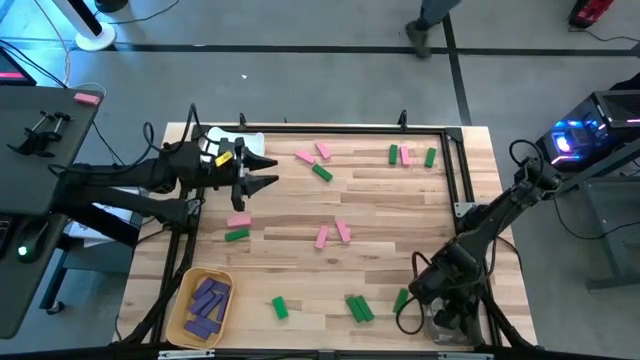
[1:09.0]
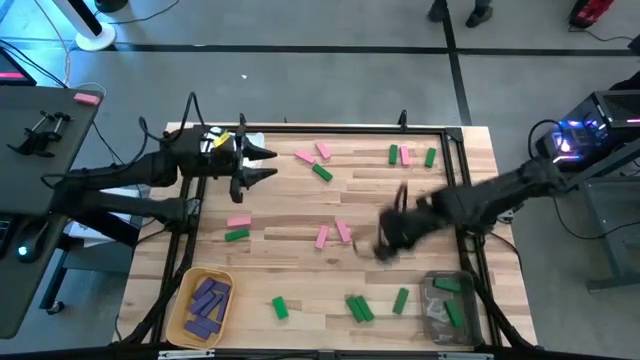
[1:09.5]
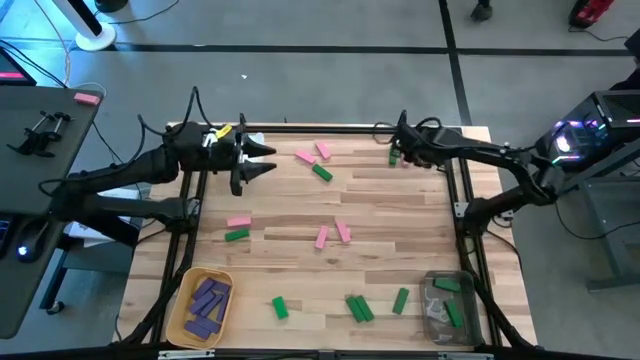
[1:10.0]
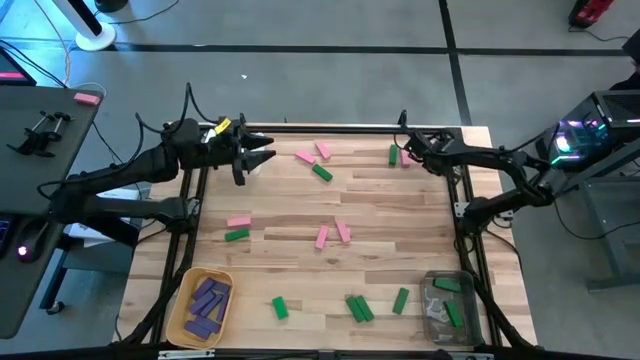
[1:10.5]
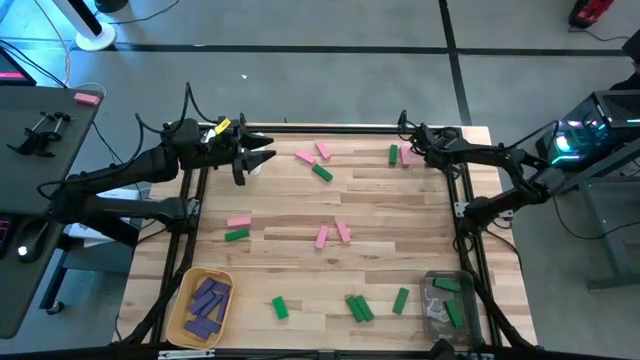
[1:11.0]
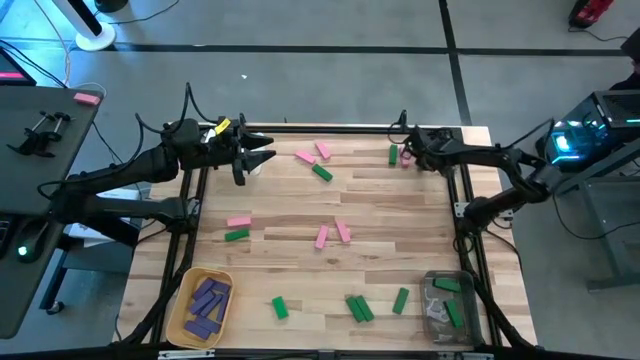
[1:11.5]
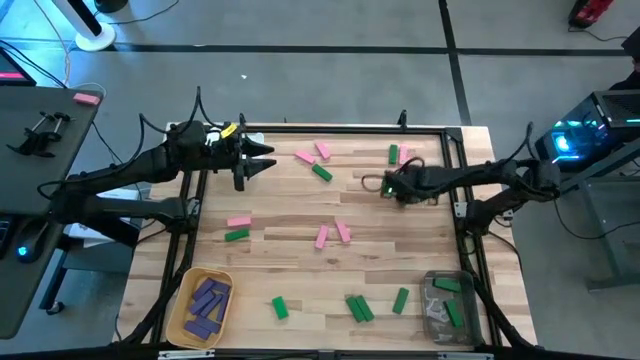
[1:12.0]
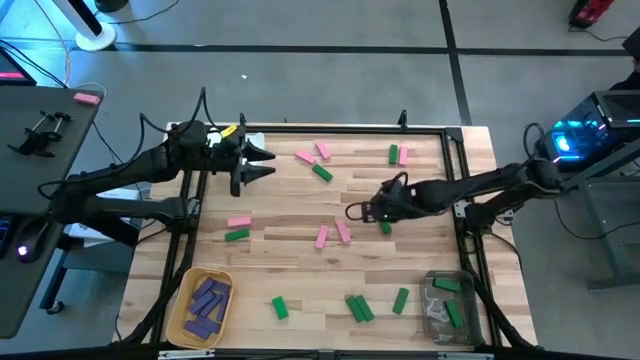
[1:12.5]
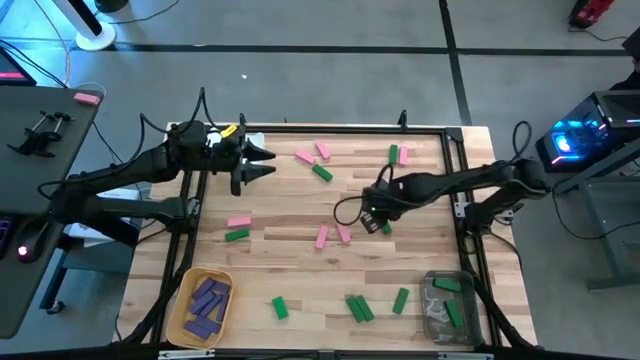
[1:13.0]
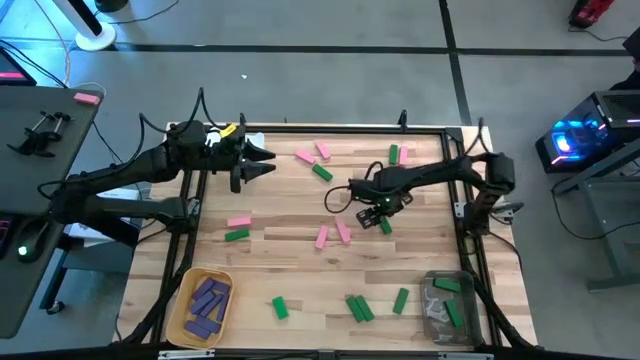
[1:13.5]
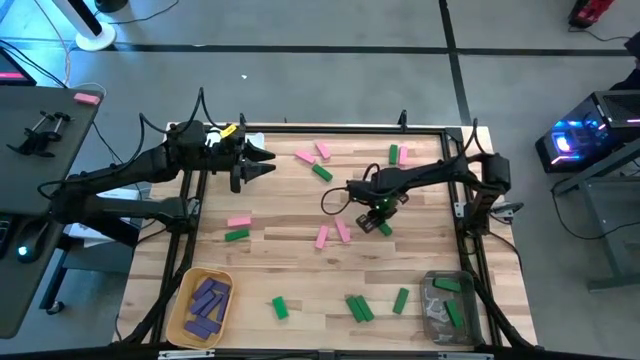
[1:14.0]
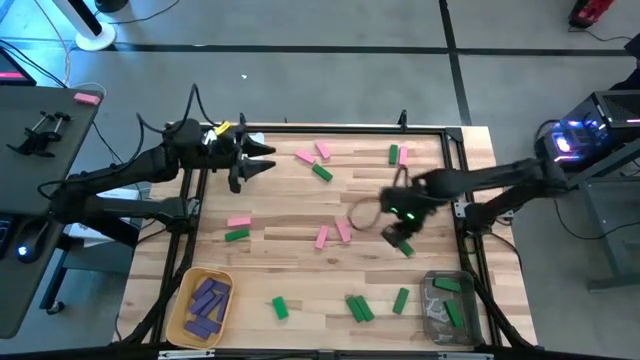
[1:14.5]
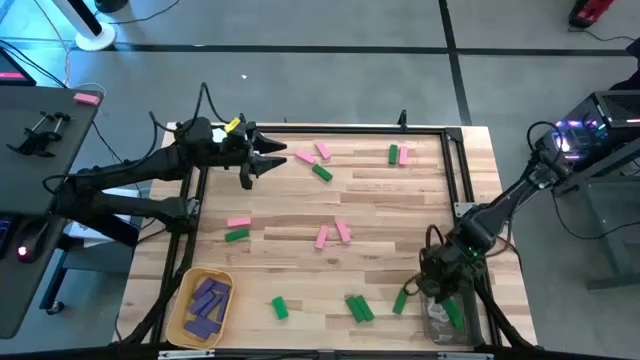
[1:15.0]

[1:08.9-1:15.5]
Task: Sort blocks
Put the green block into the black bin

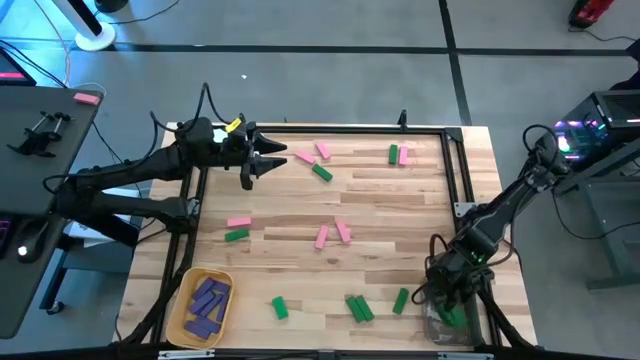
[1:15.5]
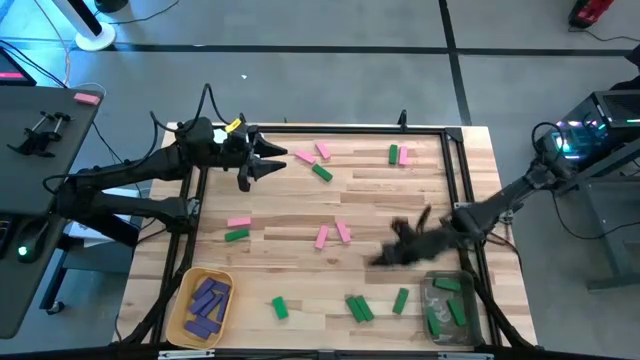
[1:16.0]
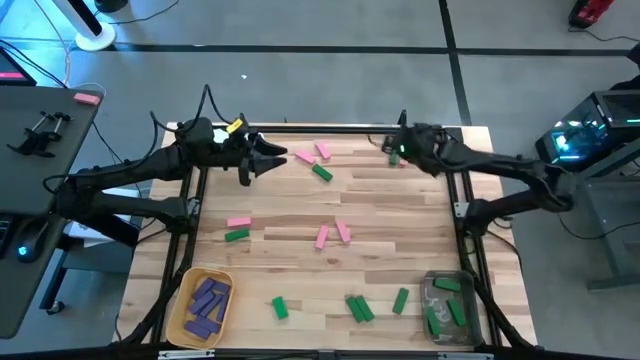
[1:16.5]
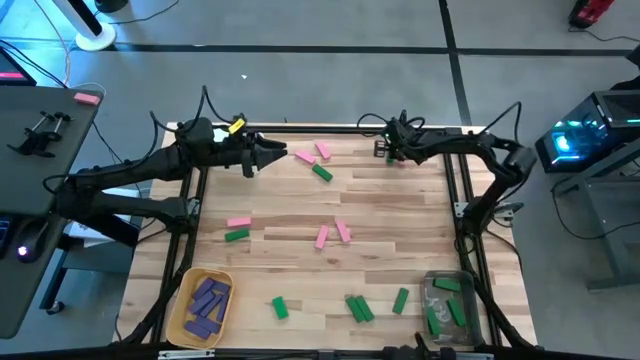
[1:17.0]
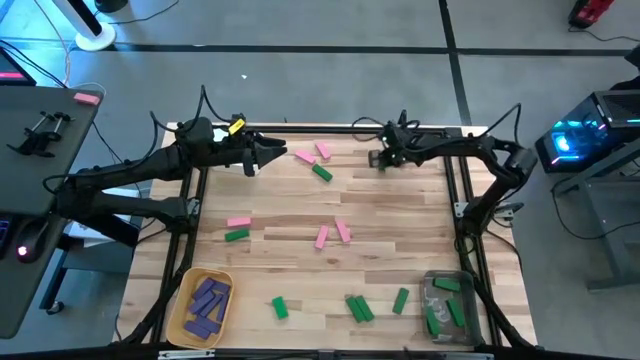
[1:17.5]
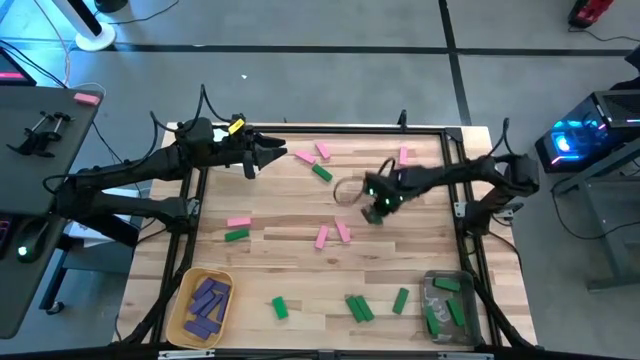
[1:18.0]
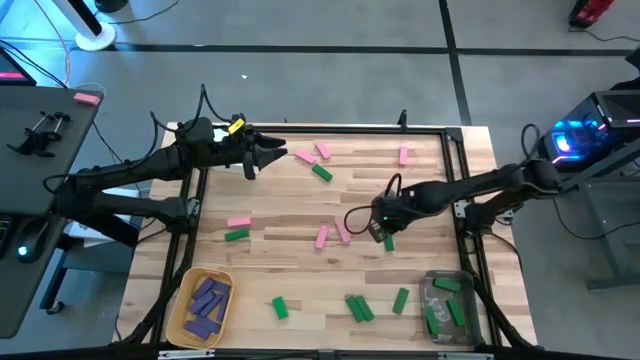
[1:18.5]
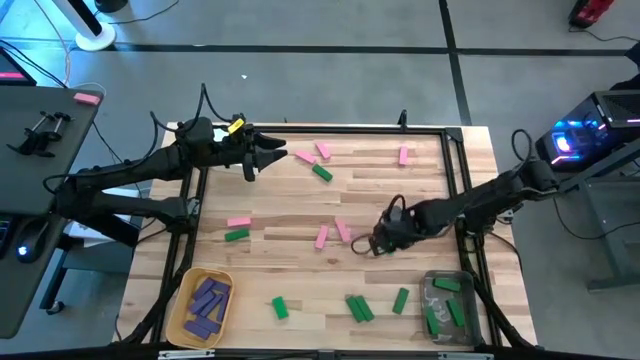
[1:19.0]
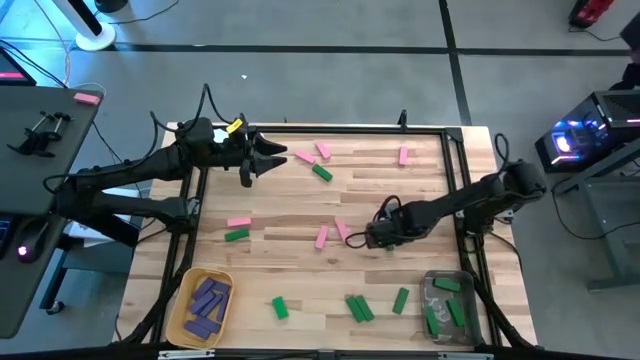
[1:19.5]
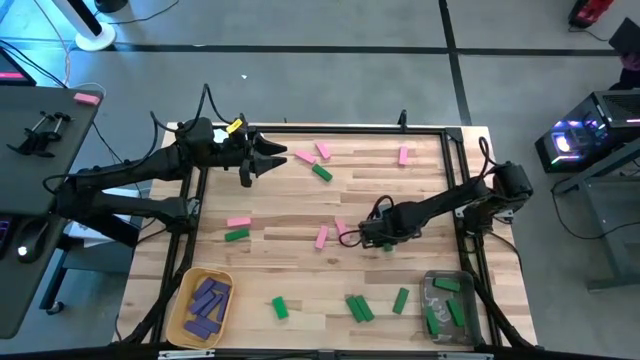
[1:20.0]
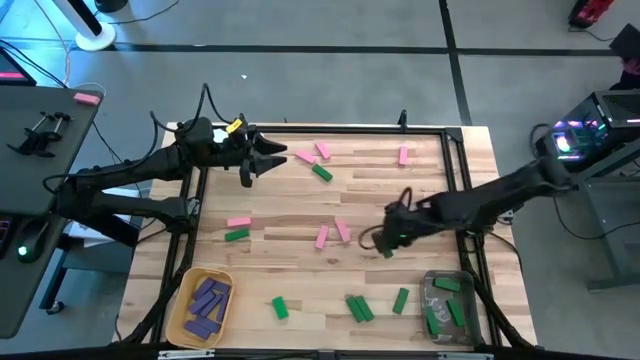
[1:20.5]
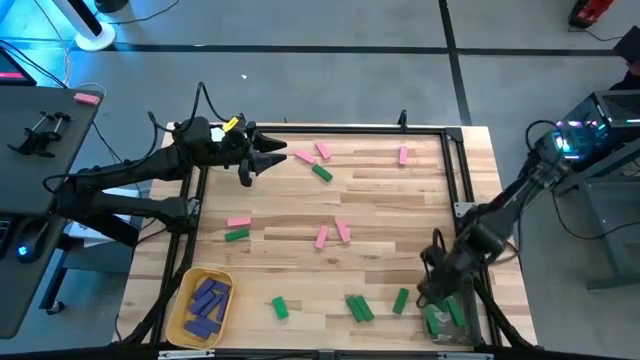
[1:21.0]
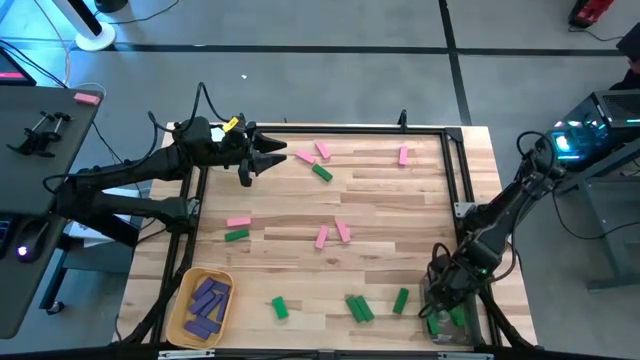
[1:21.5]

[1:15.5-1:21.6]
Put the green block into the black bin

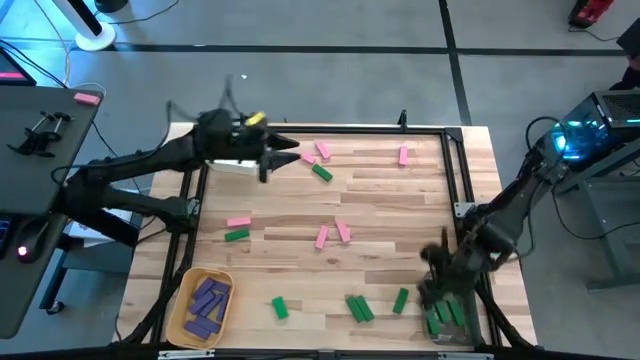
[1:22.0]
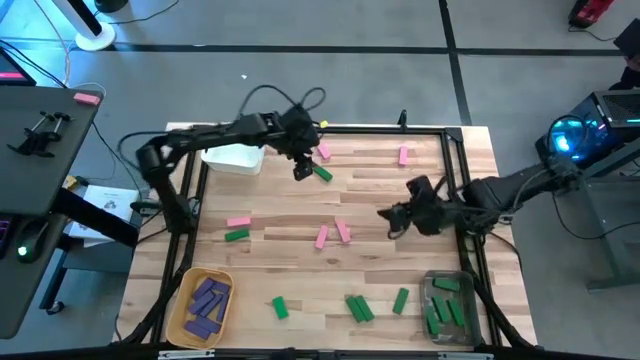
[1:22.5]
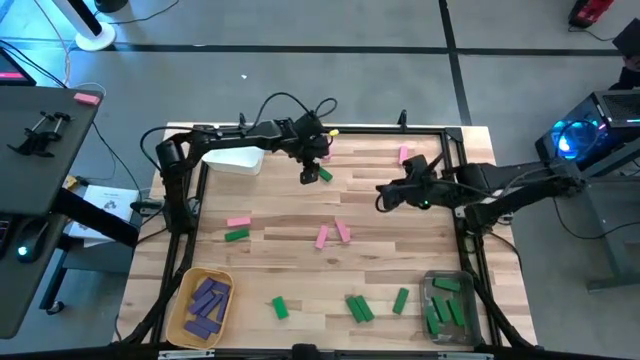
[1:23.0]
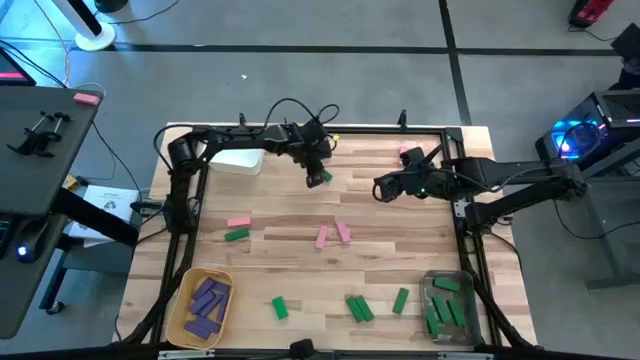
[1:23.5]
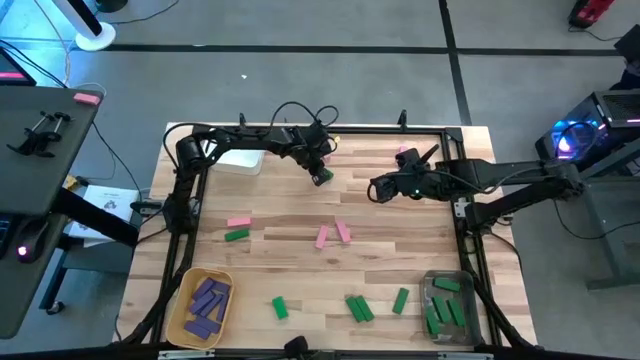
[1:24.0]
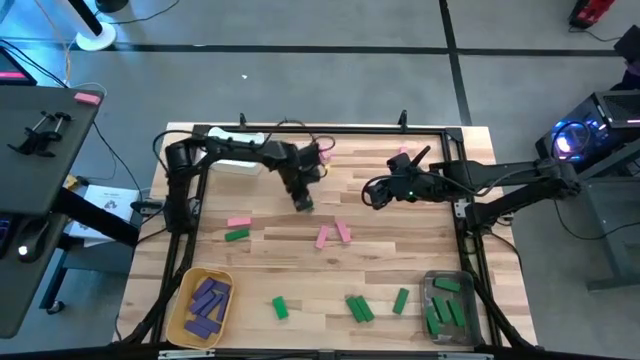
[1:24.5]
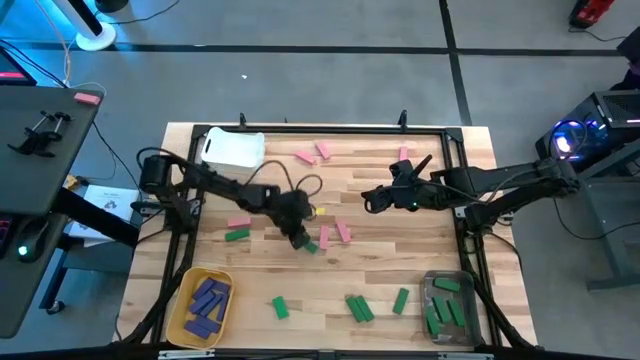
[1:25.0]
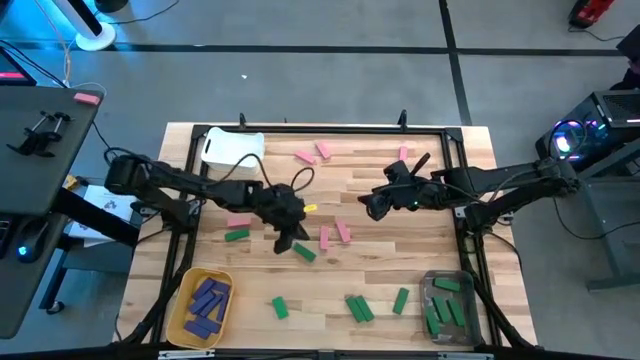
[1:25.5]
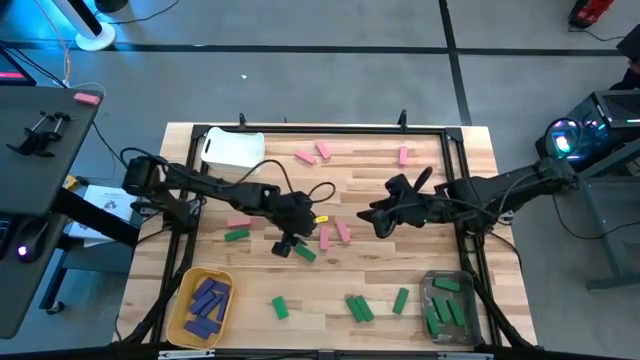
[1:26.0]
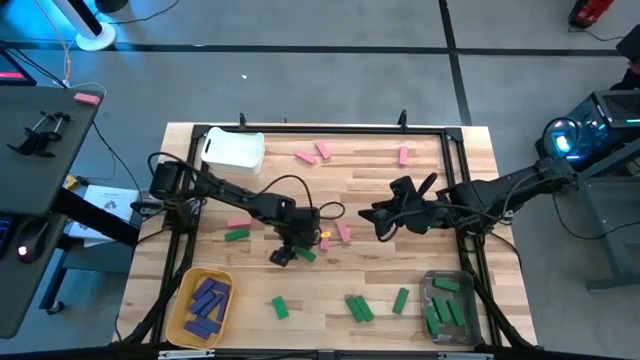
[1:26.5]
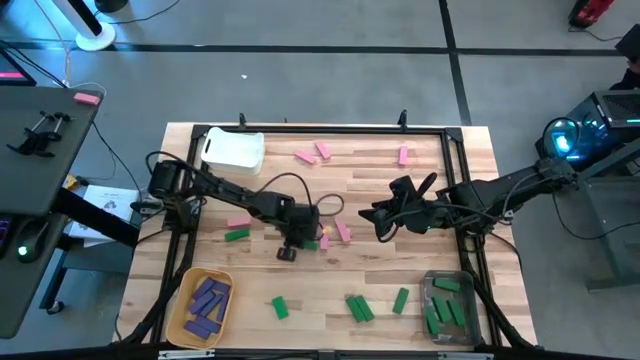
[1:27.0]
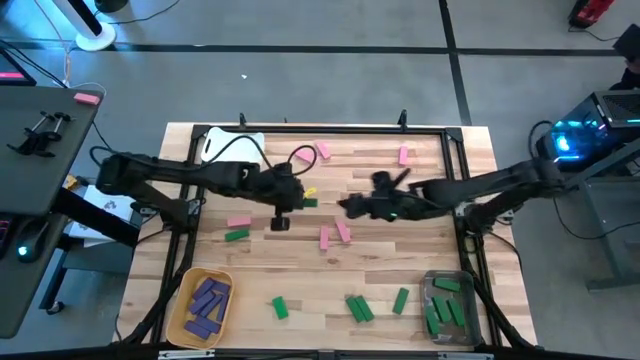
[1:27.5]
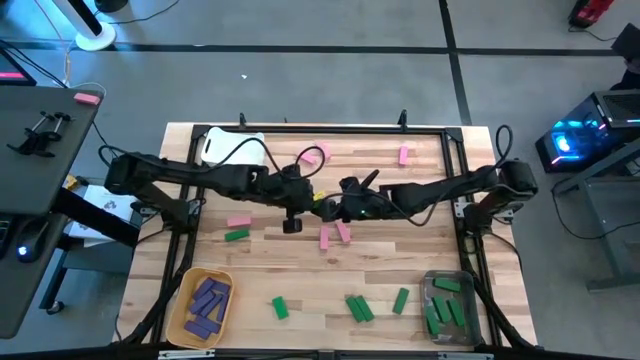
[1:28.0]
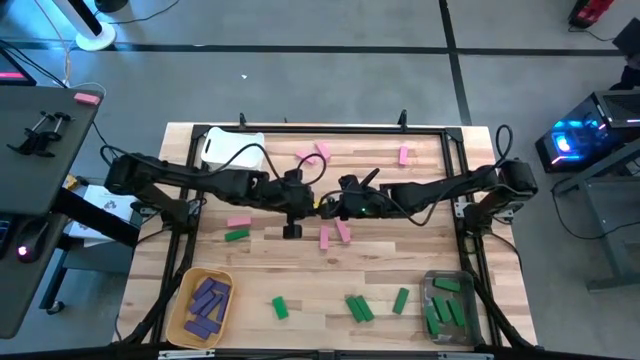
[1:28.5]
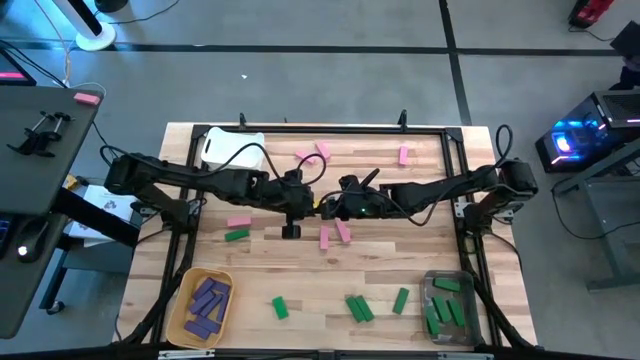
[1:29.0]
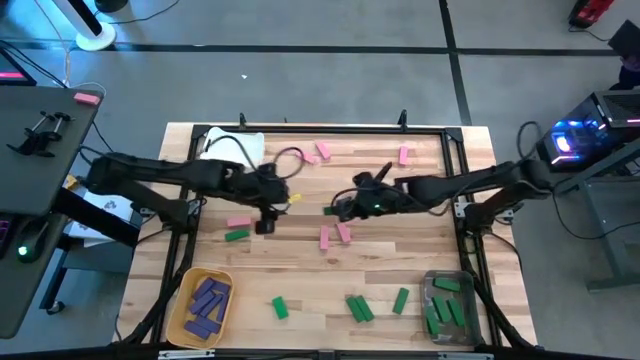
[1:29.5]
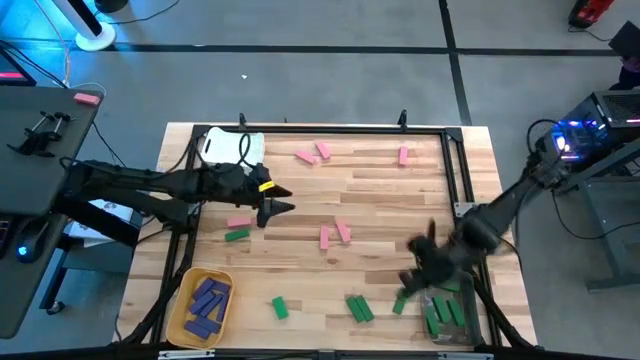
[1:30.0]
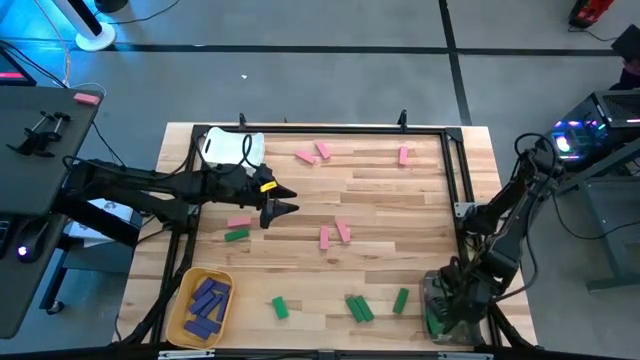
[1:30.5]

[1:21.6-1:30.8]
Put the green block into the black bin
